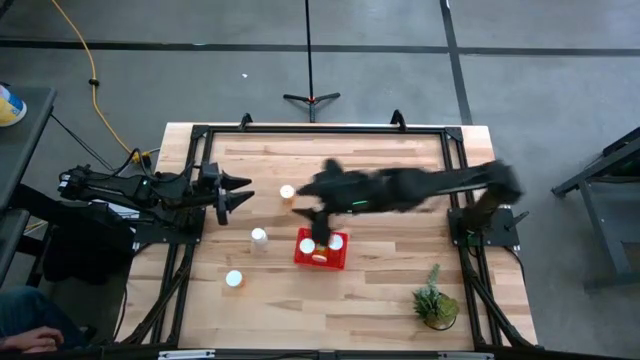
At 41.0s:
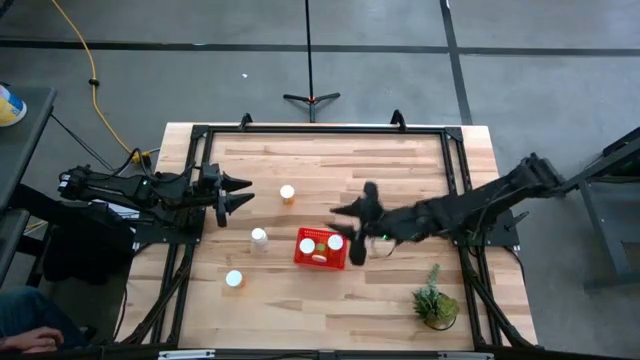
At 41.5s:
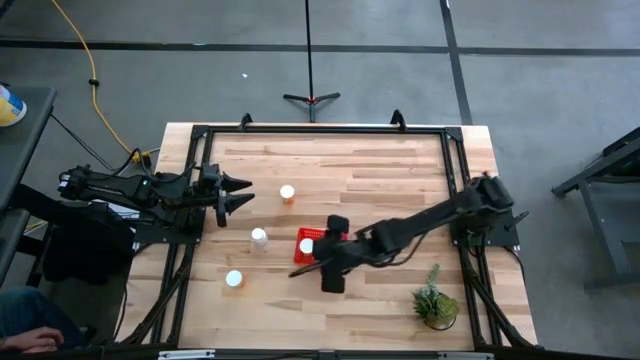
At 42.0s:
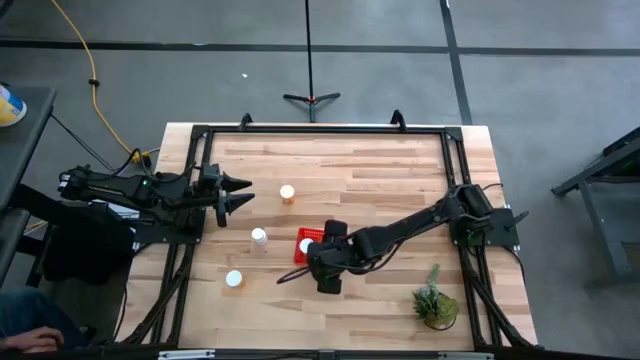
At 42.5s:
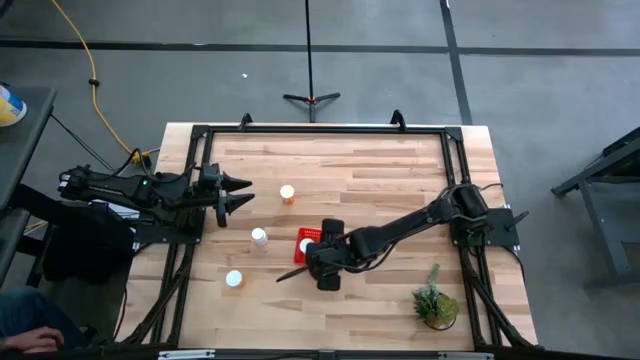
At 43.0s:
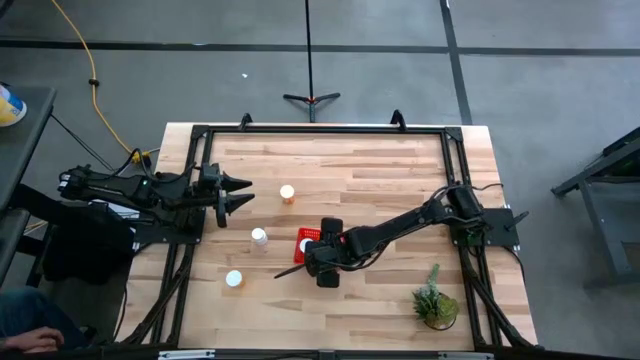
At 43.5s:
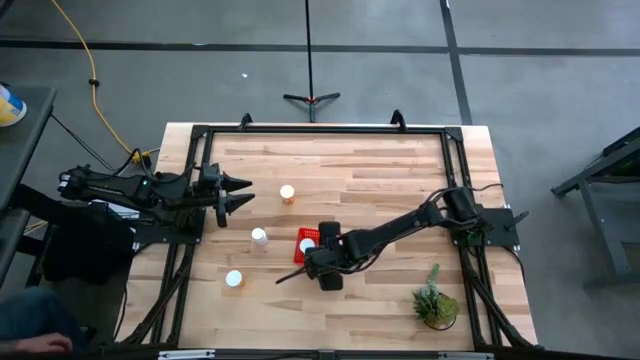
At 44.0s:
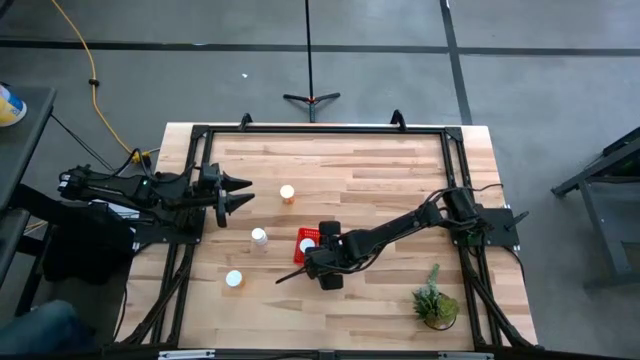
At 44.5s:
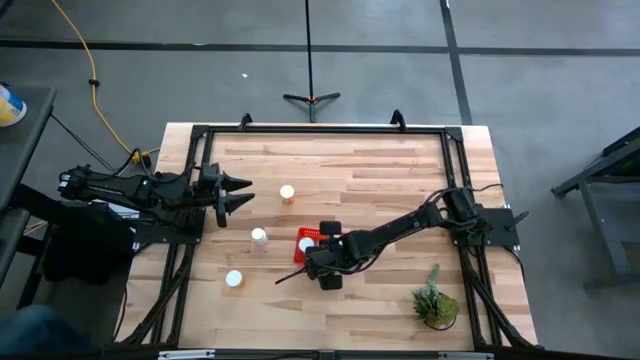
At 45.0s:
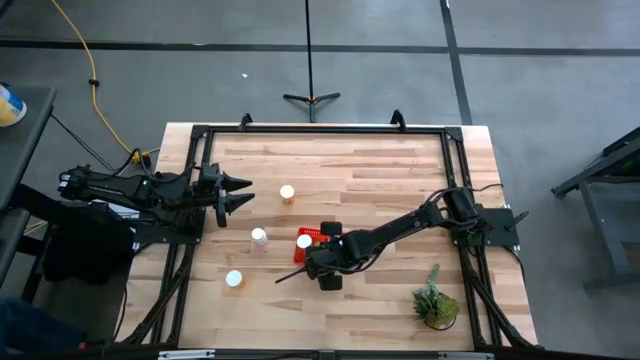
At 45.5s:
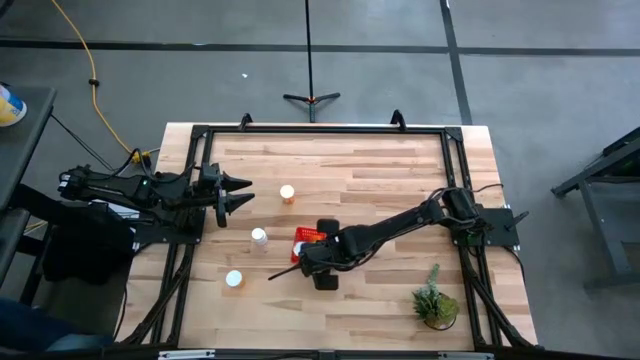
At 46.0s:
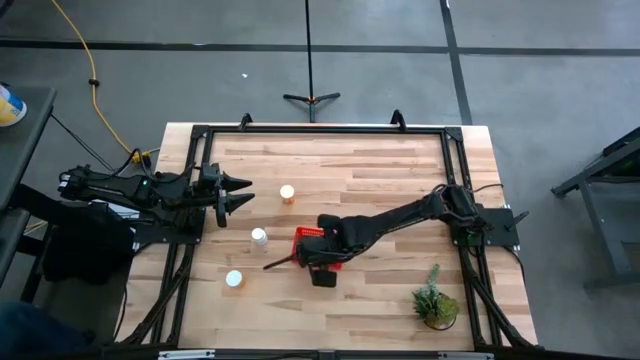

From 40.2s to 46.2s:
Task: Pick and place pill bottles into a basket
Adjust the orange pill bottle in the red bin

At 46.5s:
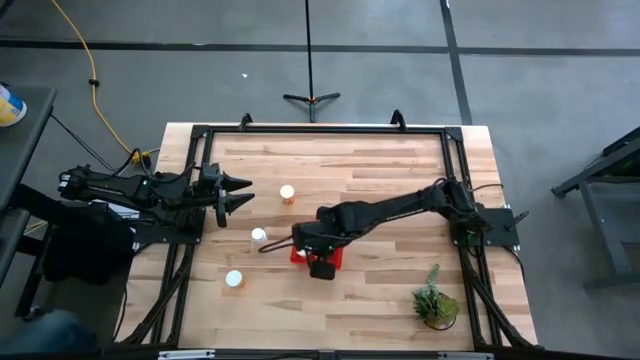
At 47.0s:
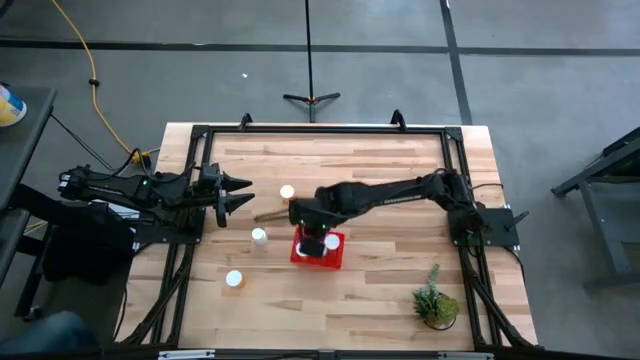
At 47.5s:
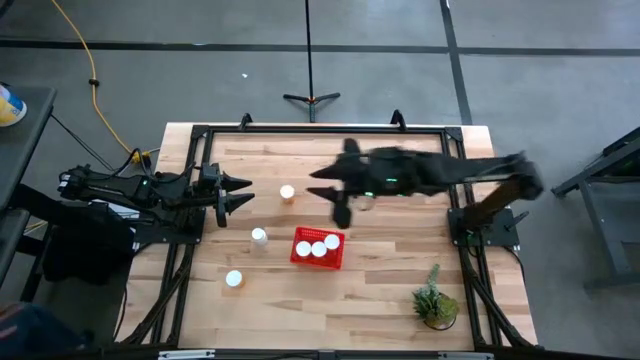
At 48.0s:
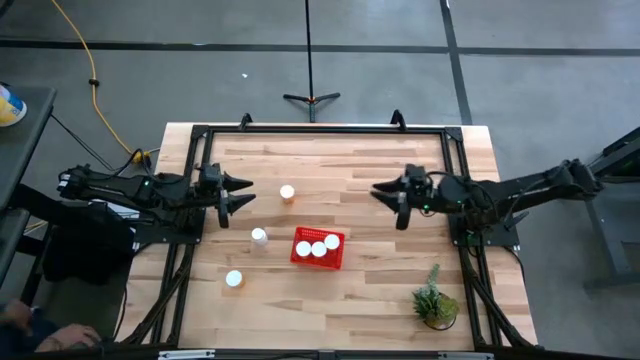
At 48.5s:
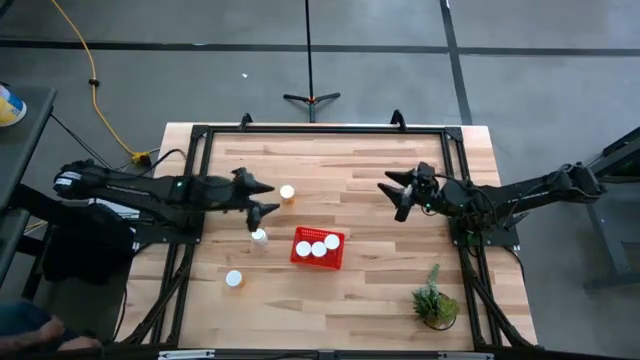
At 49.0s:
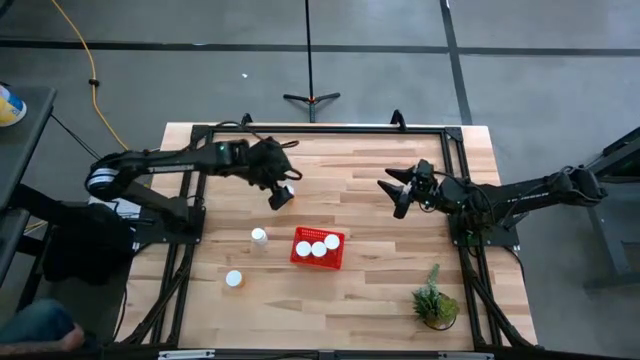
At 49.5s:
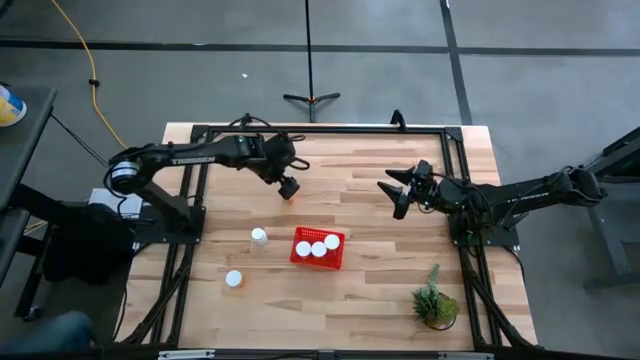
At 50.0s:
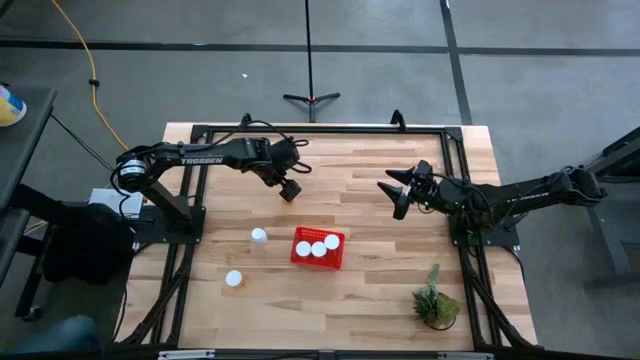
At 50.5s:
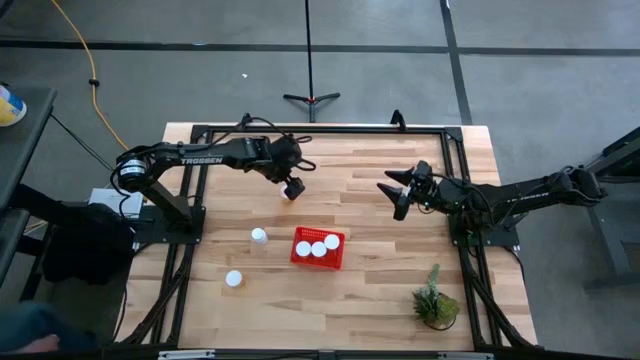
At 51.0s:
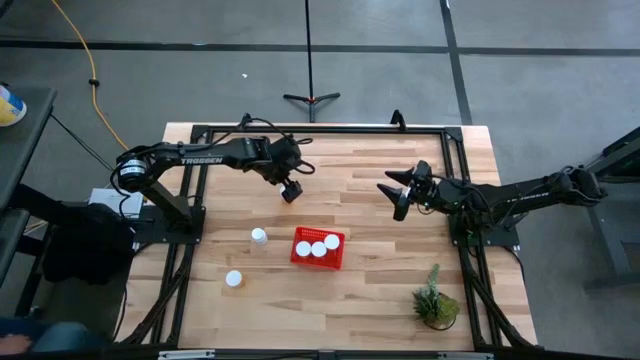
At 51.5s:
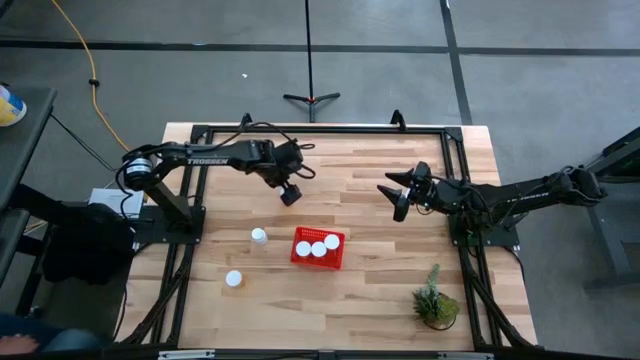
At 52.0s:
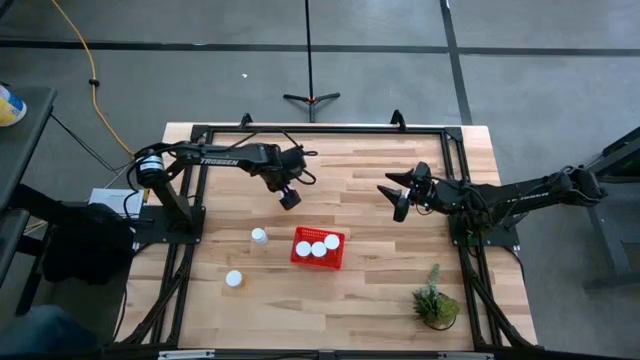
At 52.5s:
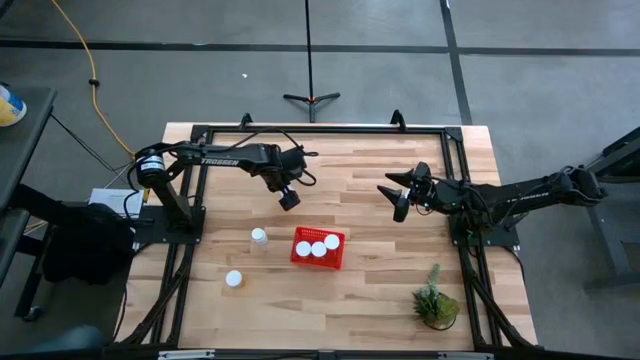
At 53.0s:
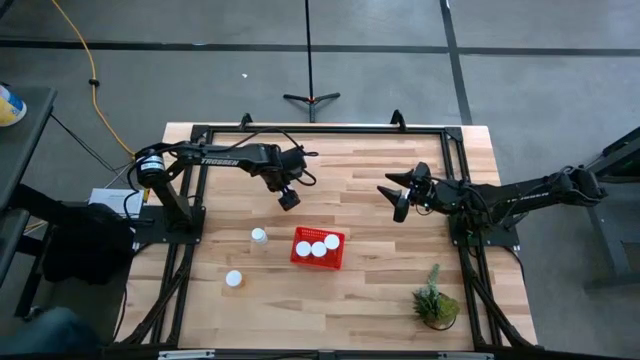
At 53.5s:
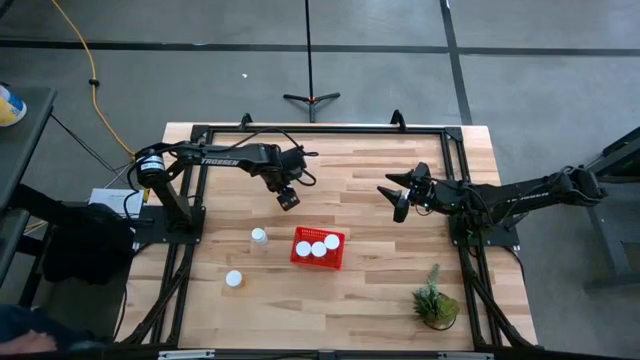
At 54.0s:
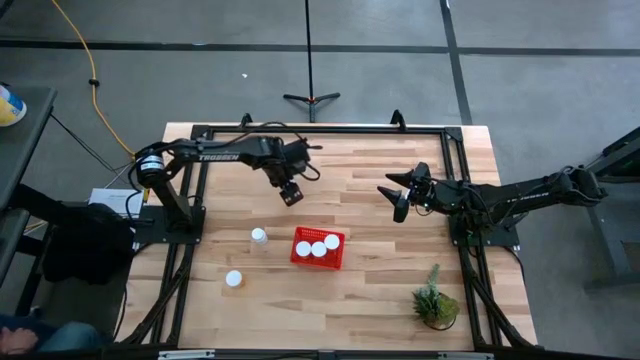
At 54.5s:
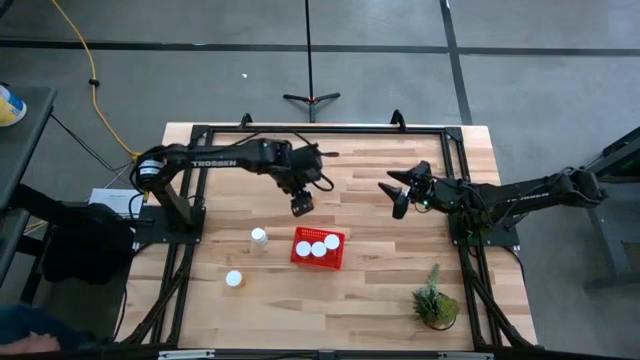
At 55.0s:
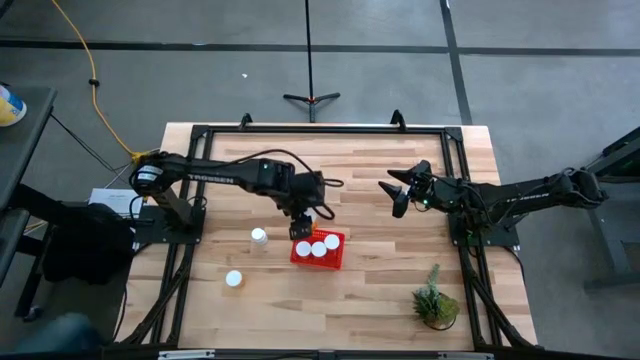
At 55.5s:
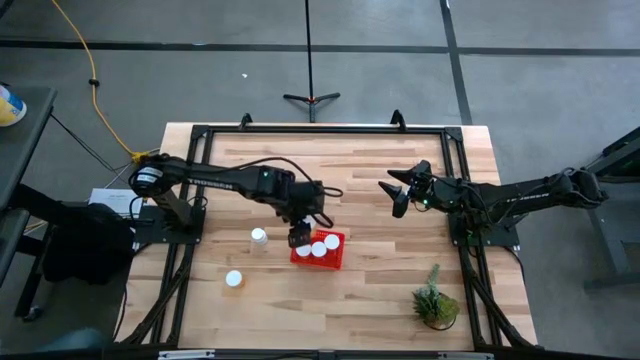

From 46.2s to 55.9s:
Put the top orange pill bottle into the red bin

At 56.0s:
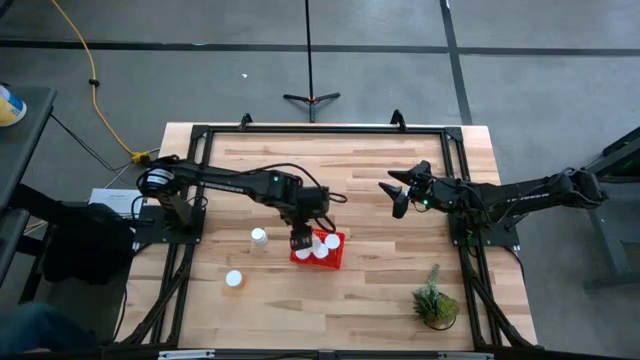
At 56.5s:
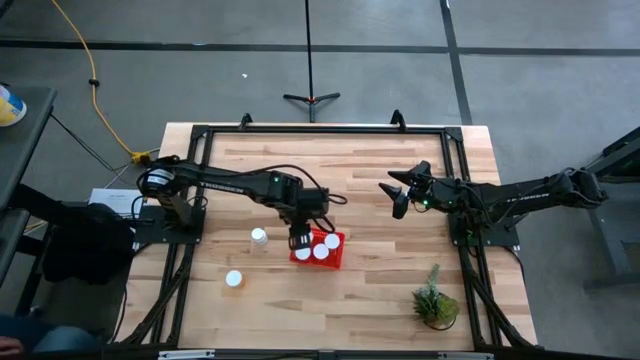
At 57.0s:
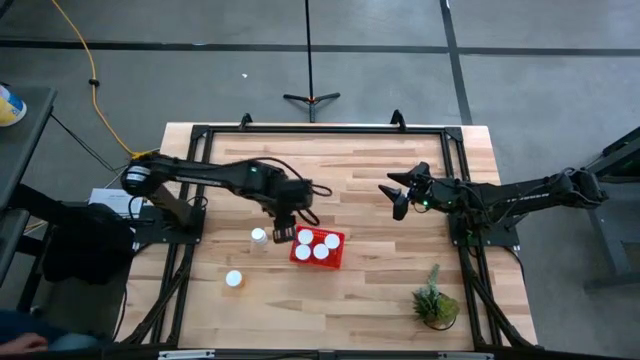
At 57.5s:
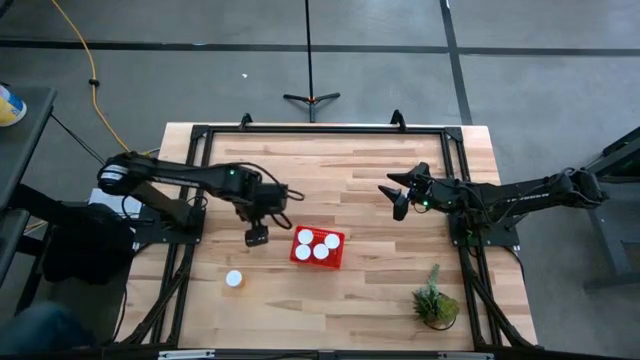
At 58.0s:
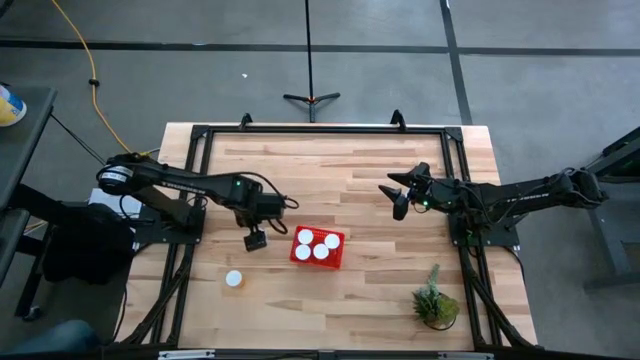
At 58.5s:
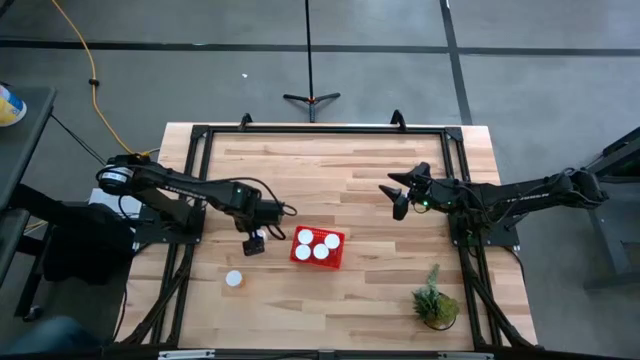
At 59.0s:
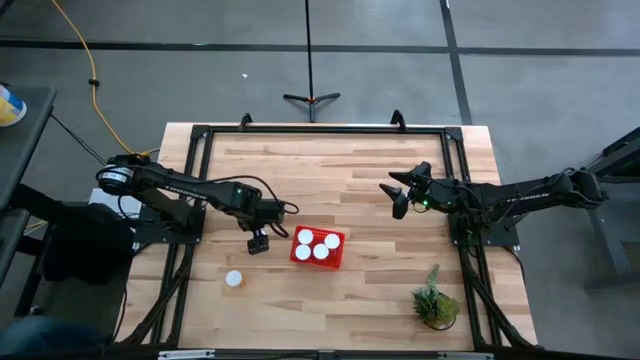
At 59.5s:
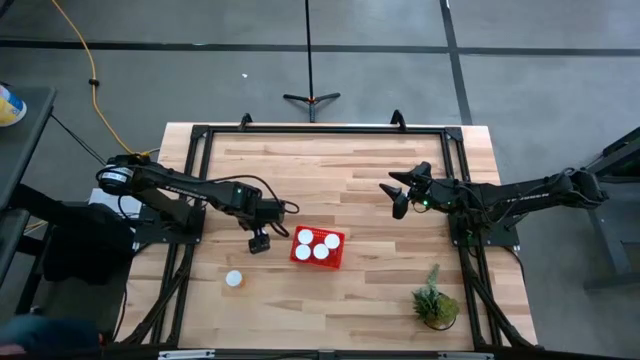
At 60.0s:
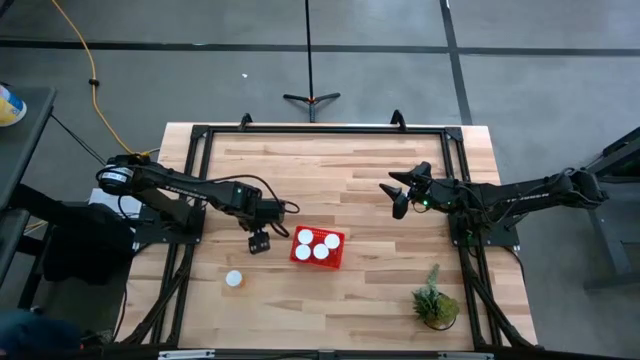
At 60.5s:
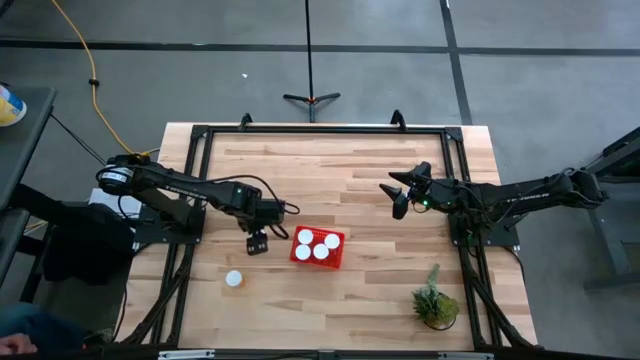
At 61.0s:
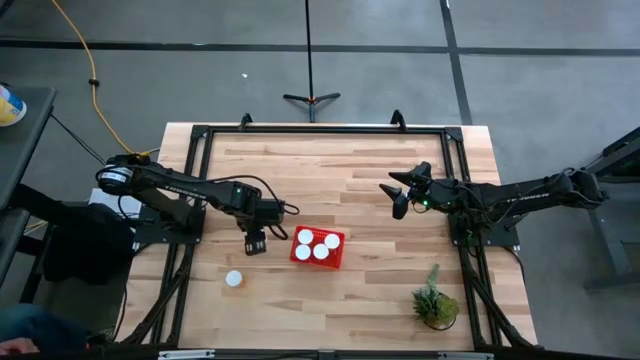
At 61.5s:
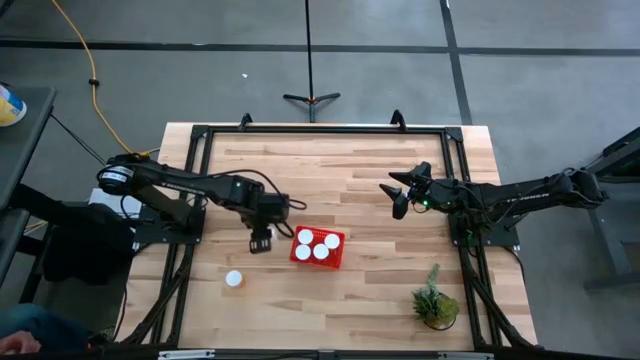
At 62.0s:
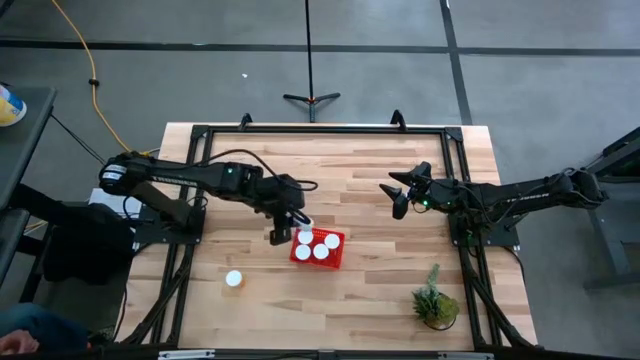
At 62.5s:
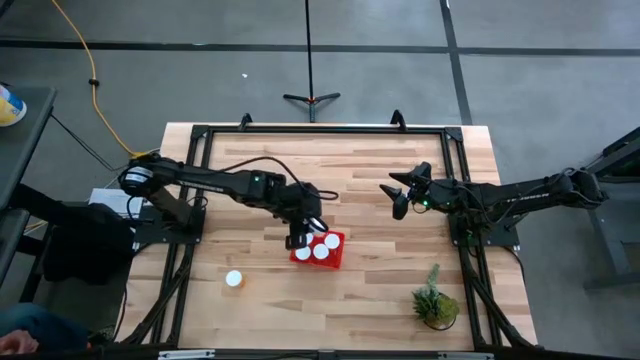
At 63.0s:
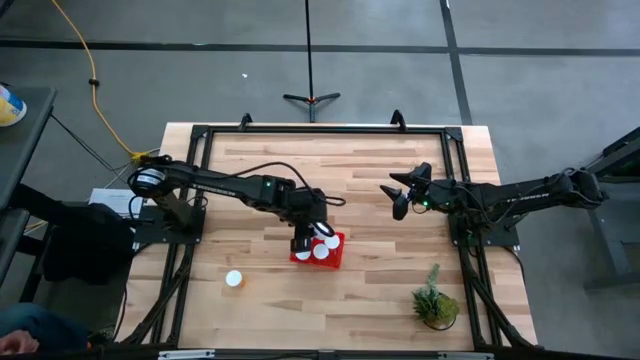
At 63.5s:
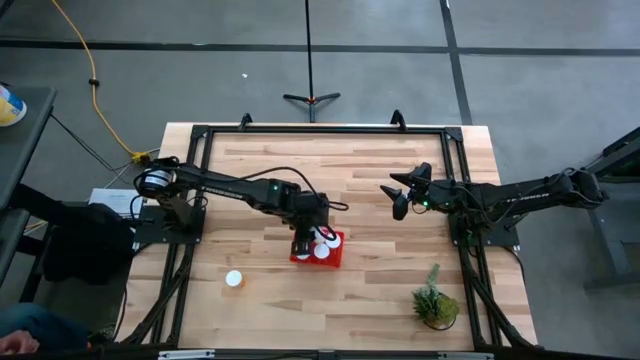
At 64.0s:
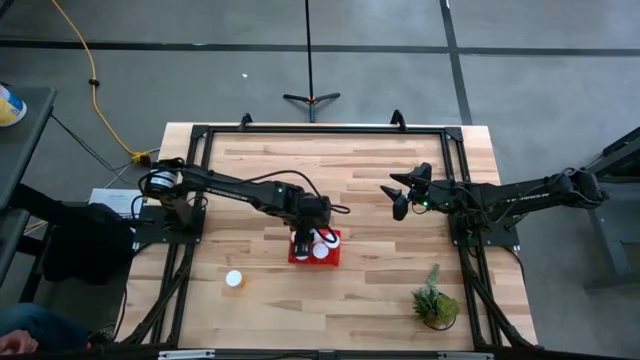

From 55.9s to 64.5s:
Put the white pill bottle into the red bin
